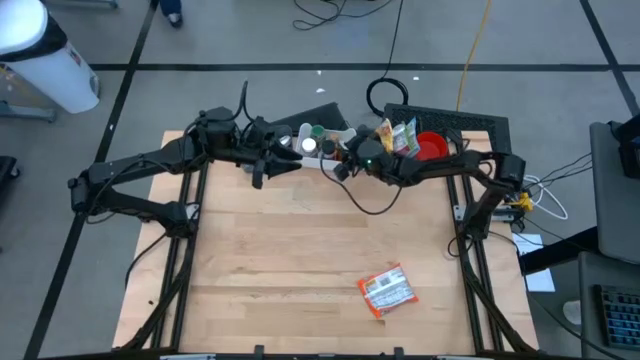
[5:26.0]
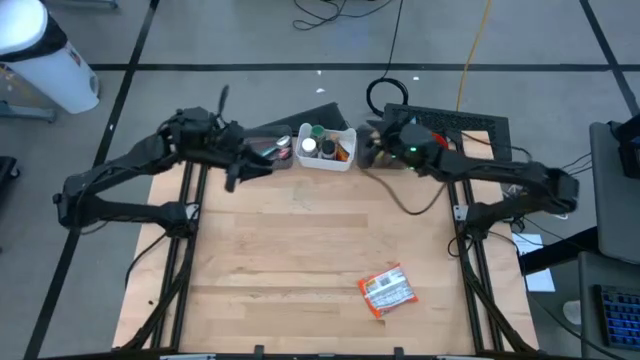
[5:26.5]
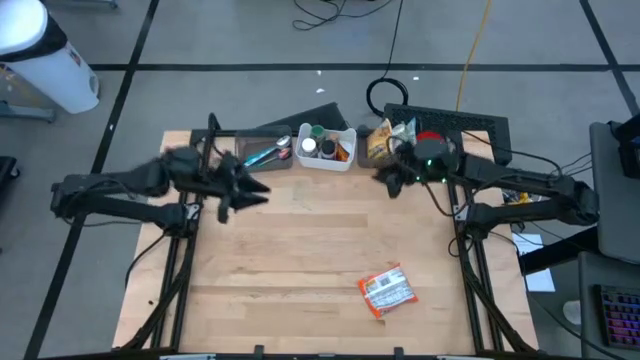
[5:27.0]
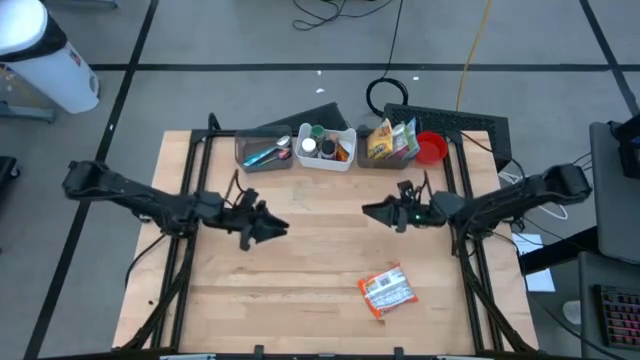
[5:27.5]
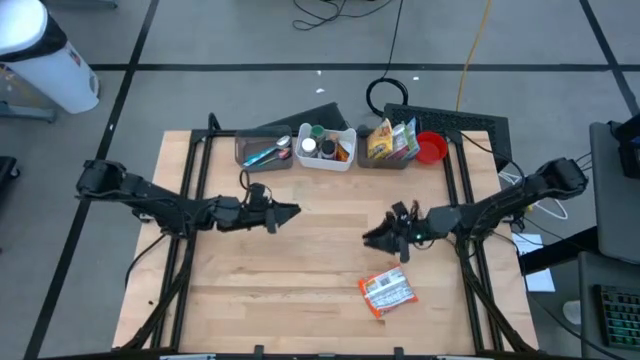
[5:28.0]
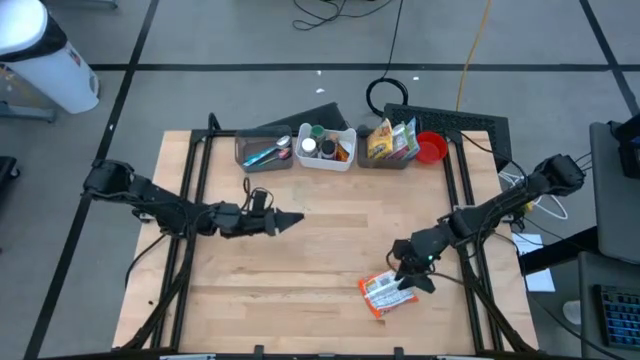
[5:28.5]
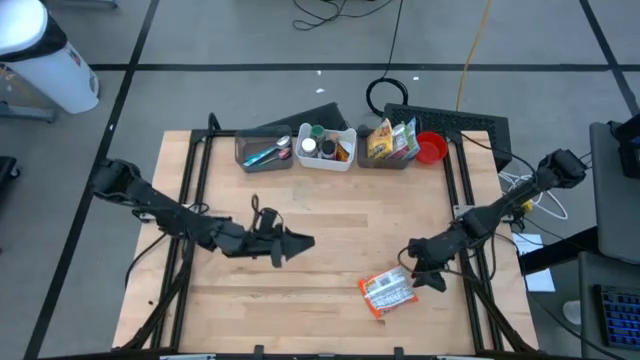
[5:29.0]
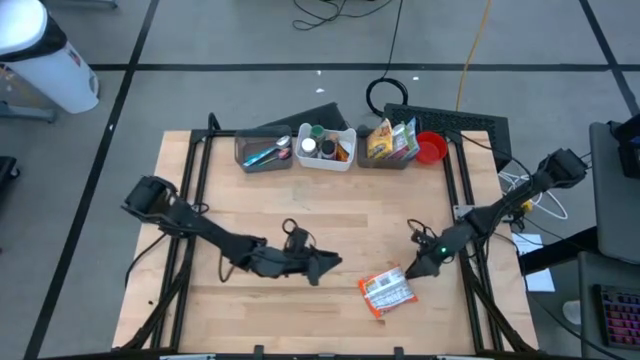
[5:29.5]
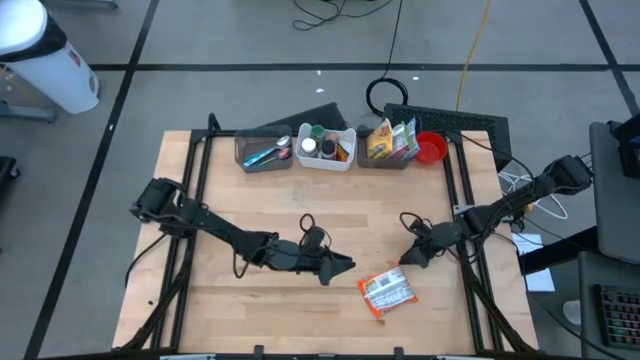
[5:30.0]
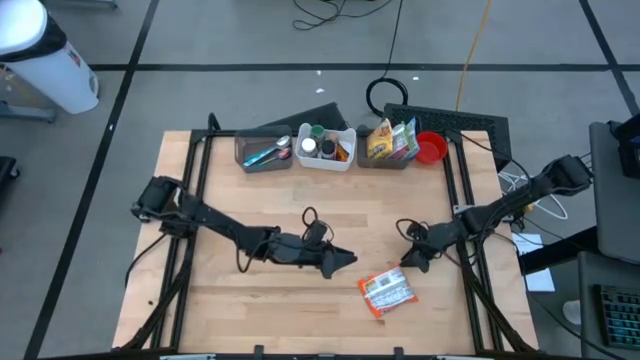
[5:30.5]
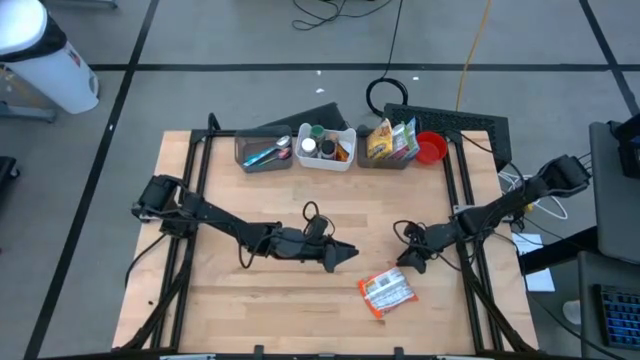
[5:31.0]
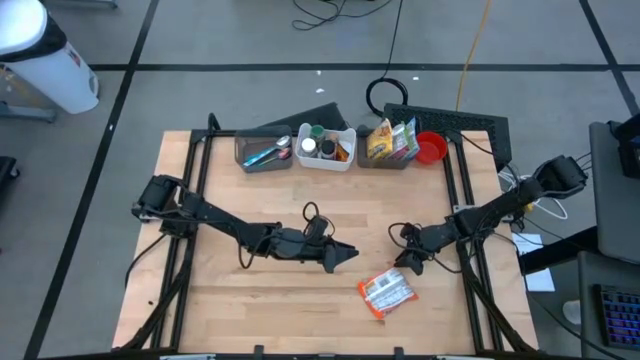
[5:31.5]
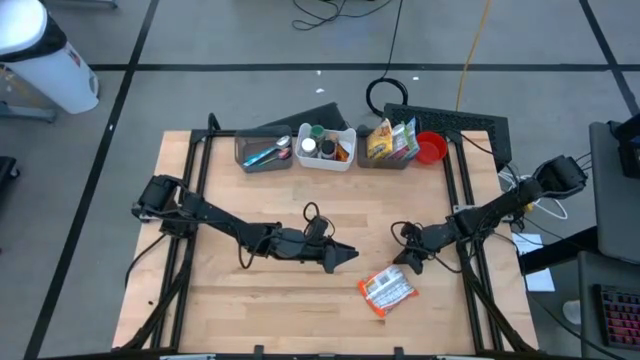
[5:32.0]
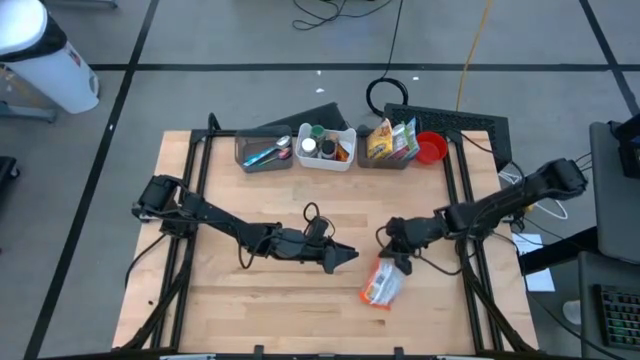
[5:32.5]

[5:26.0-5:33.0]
Task: Pick & Place Food Item
Put the orange noodle pack into the right black bin

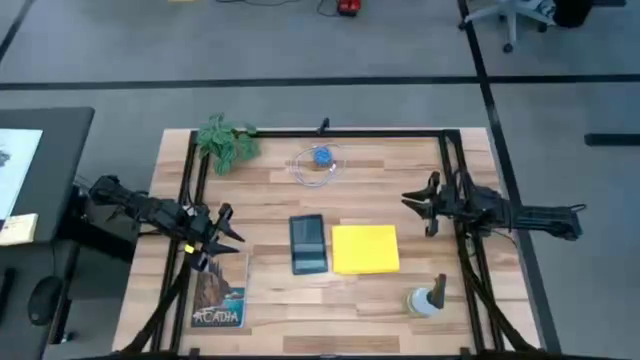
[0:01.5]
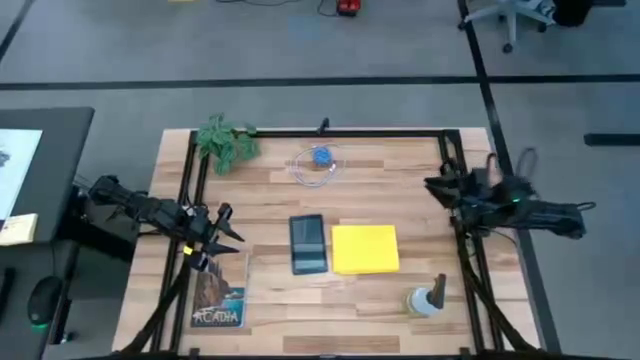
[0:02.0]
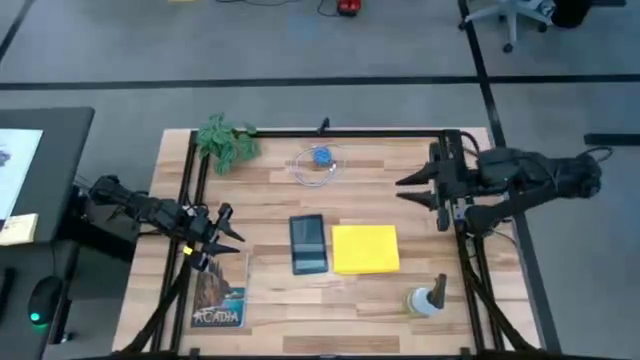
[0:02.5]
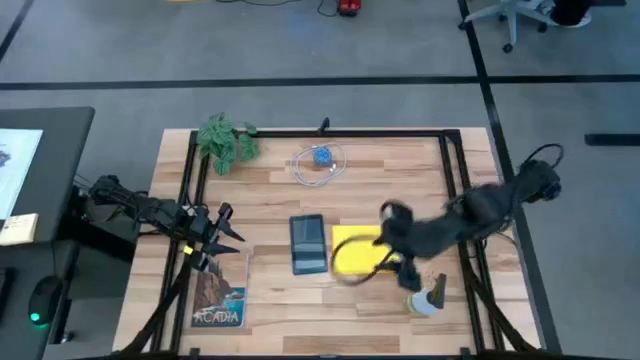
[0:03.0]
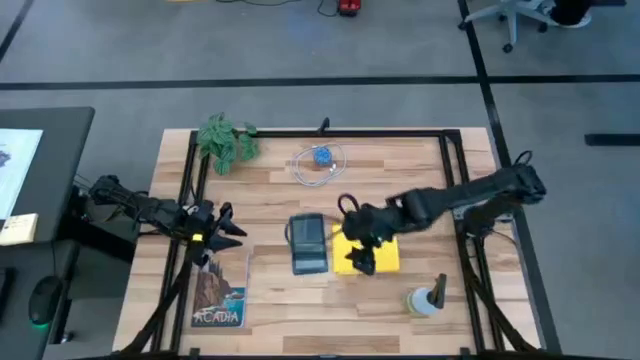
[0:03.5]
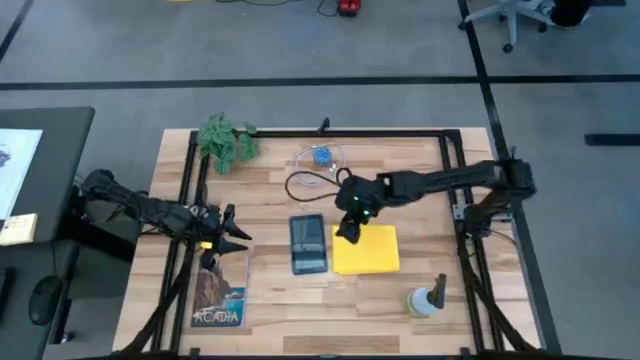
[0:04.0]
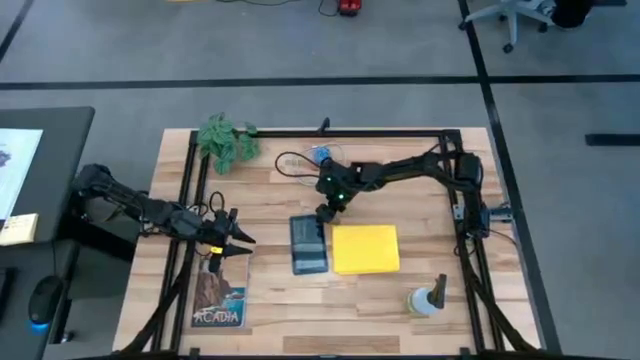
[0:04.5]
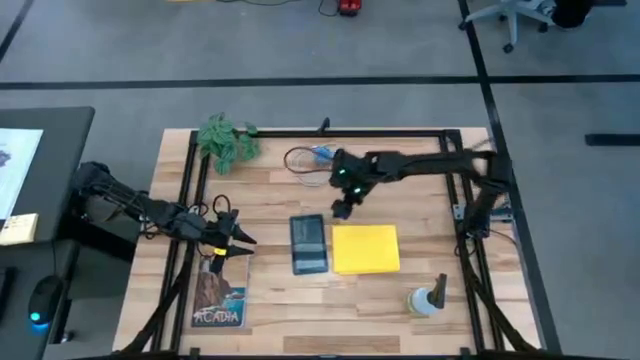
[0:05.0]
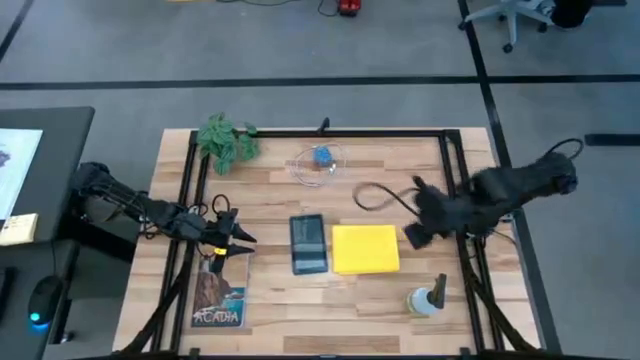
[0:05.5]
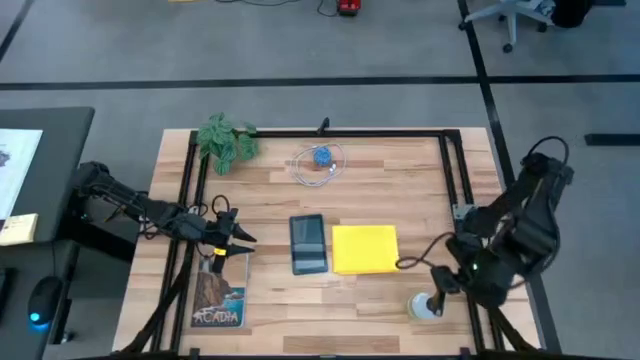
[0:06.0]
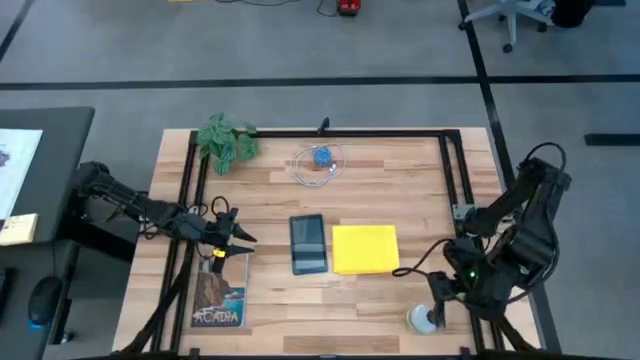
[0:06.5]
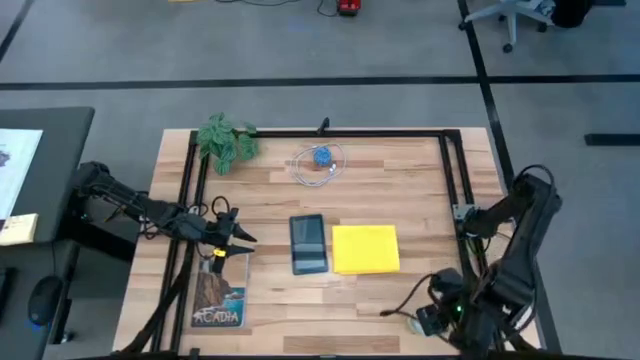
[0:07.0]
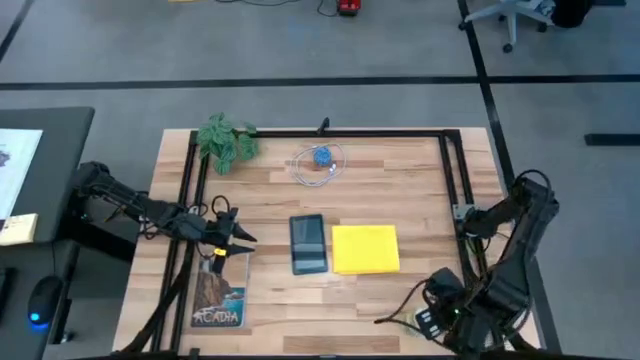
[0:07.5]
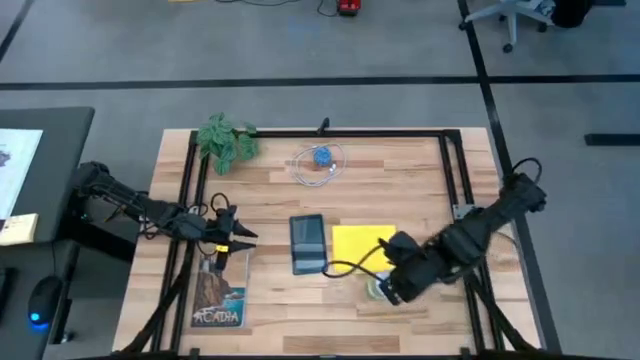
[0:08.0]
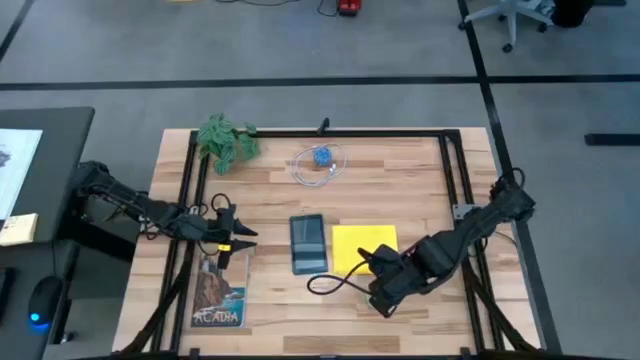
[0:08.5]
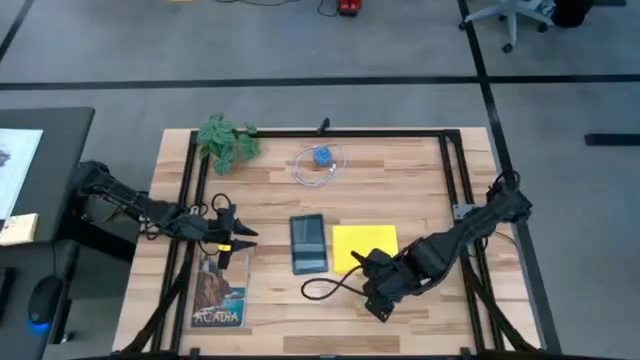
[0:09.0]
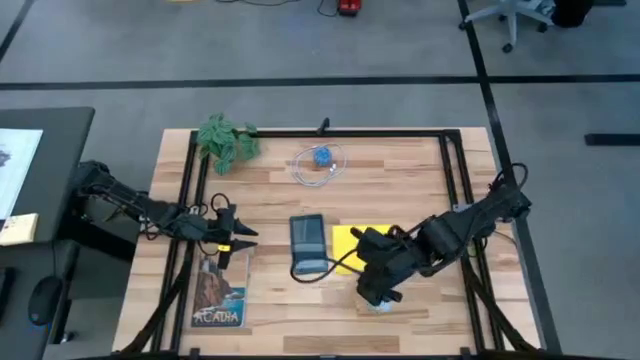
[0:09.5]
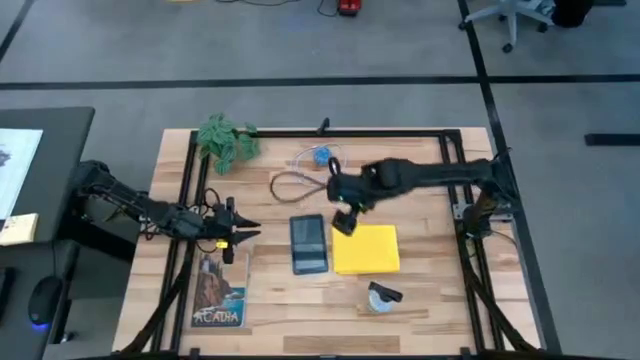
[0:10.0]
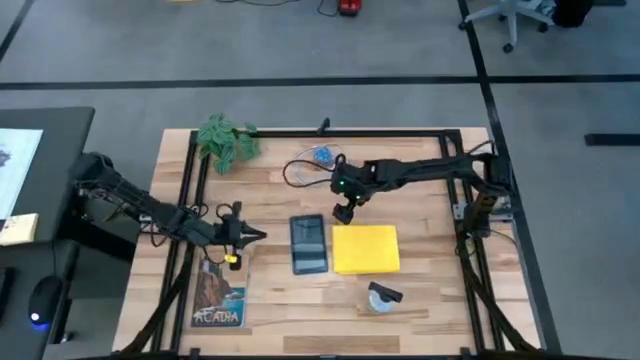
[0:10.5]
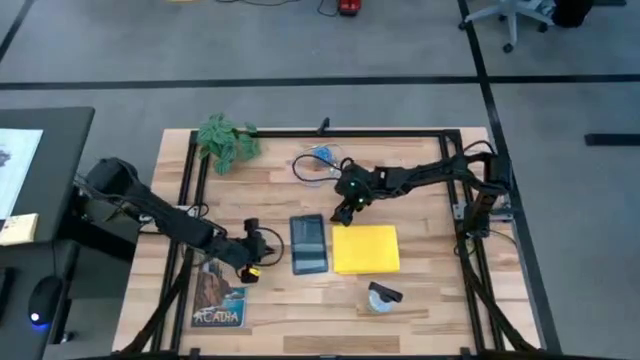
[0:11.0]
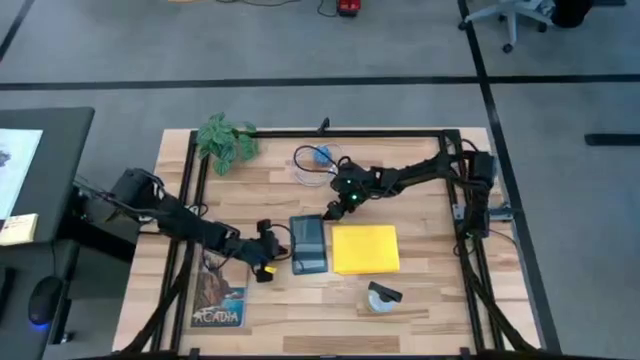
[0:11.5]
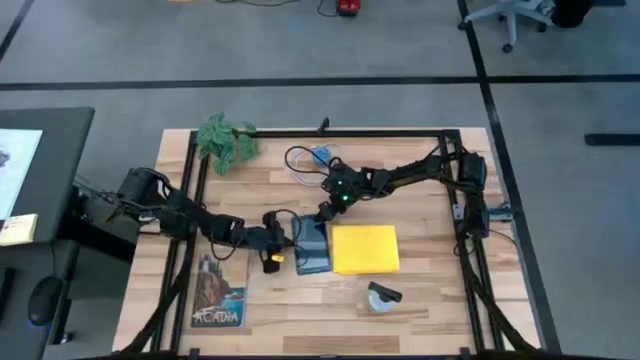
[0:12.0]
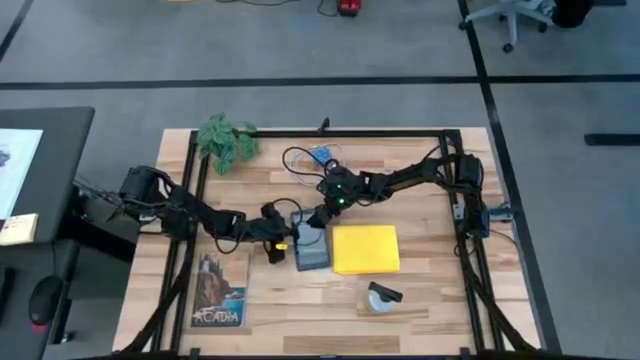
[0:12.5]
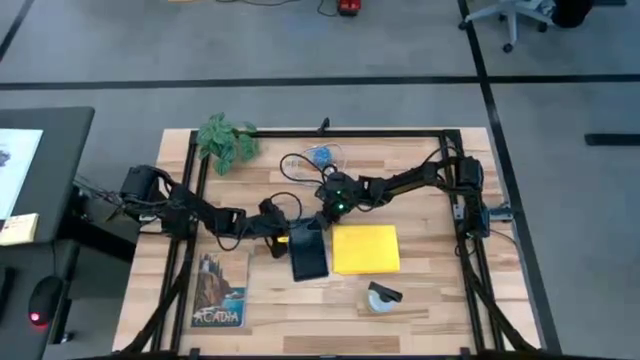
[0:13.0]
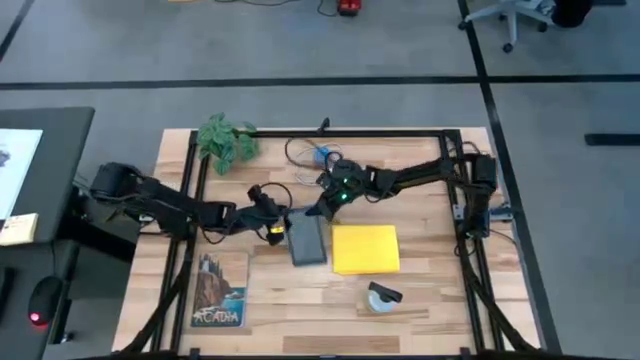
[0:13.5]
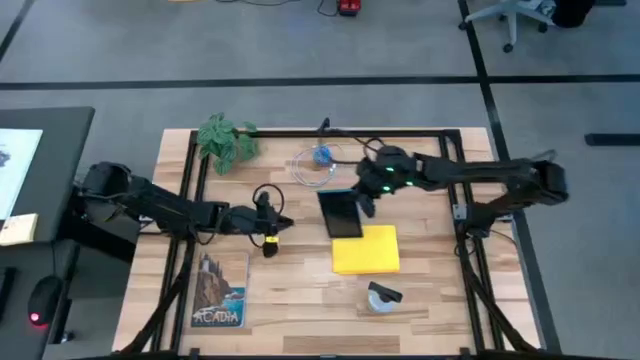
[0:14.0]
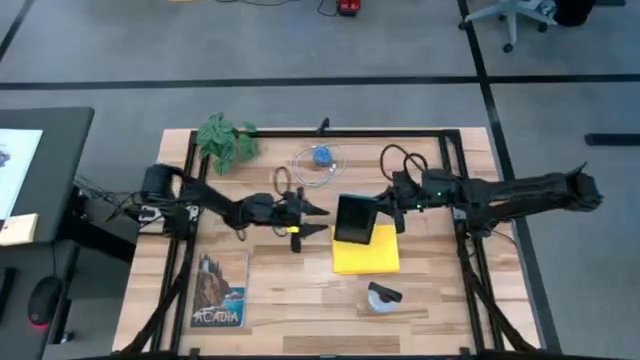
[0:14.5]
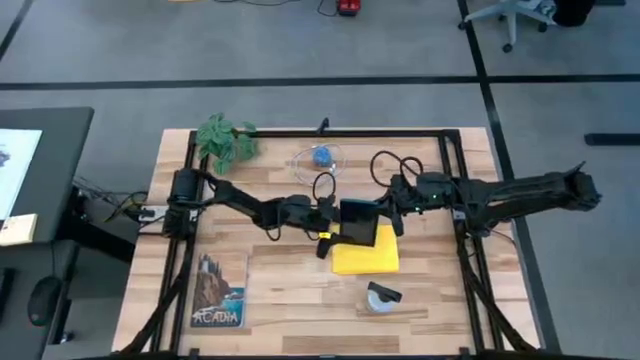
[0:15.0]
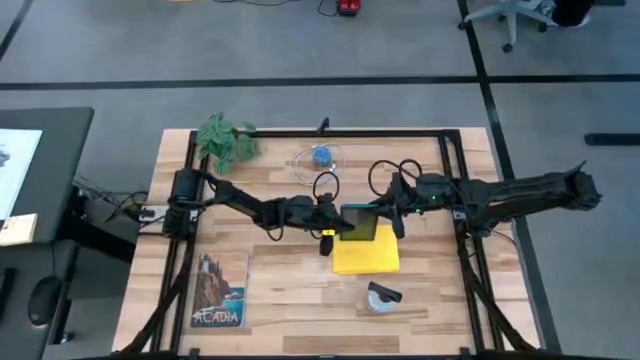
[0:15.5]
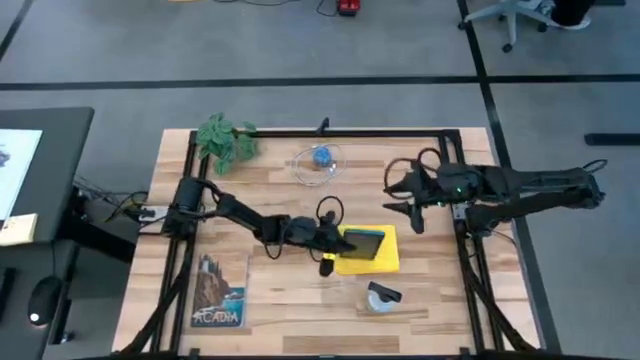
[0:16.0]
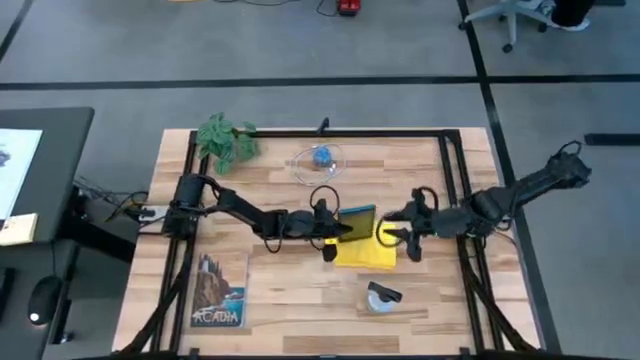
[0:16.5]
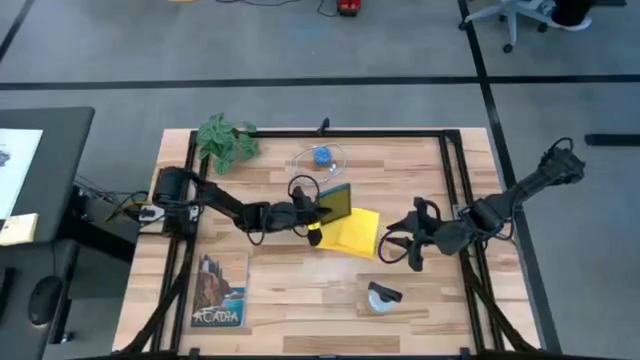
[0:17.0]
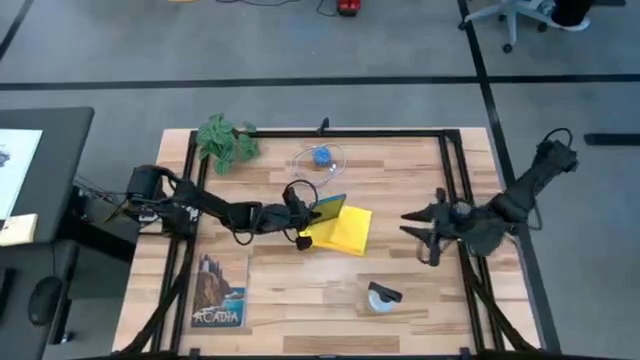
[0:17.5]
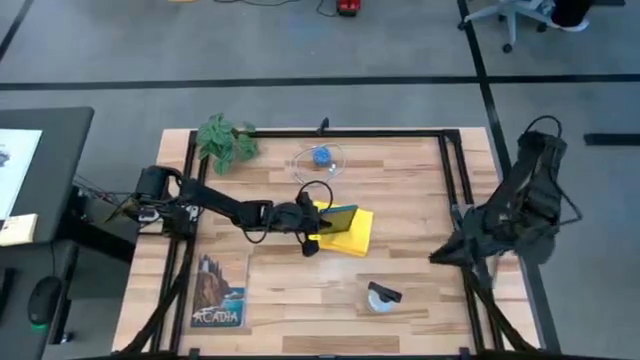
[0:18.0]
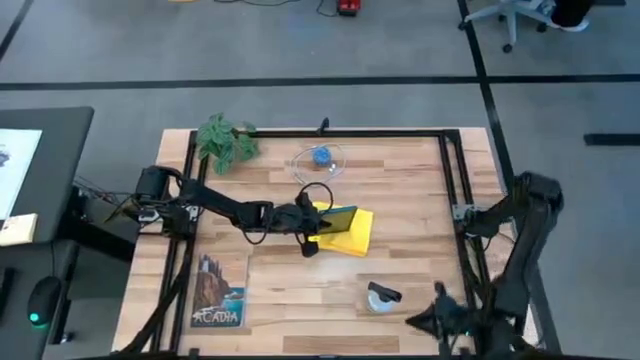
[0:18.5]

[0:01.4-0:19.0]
Task: Apply microfiber cloth
Spray the tablet using the spray bottle
